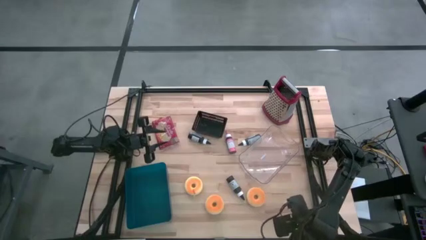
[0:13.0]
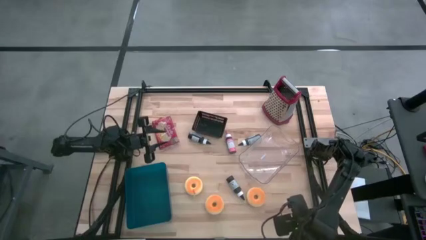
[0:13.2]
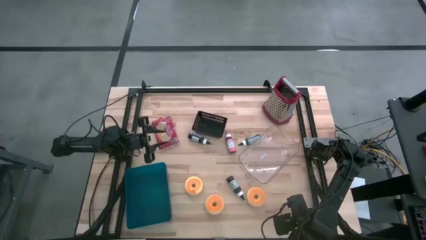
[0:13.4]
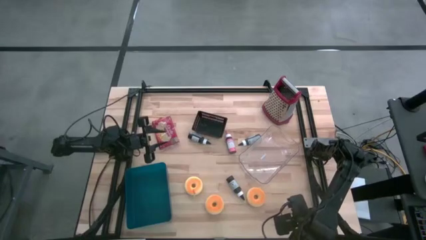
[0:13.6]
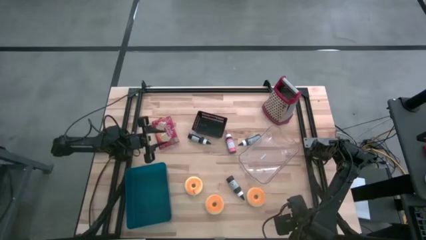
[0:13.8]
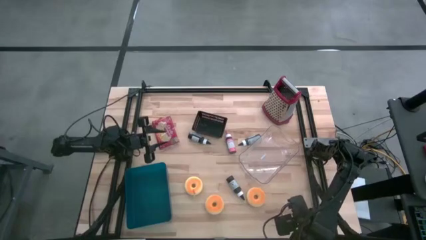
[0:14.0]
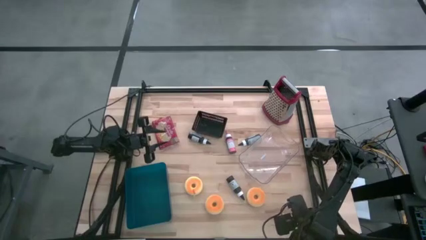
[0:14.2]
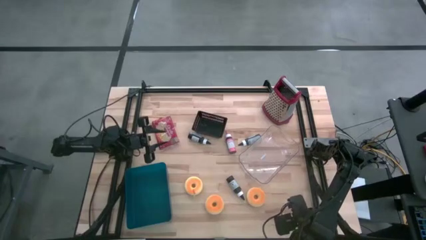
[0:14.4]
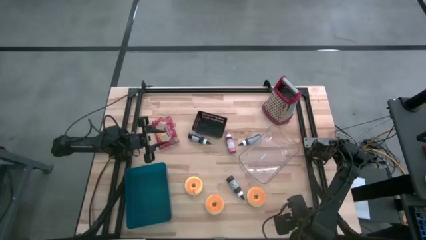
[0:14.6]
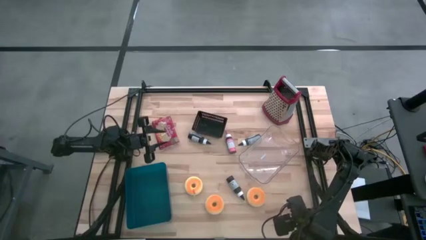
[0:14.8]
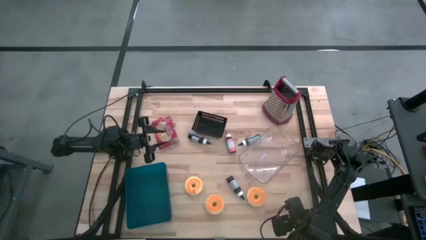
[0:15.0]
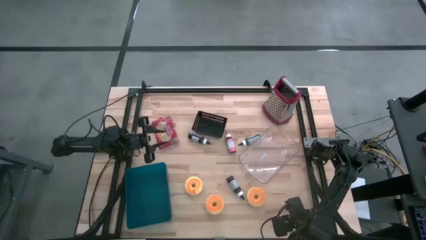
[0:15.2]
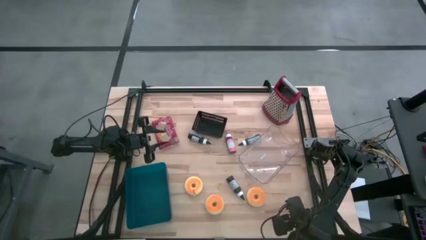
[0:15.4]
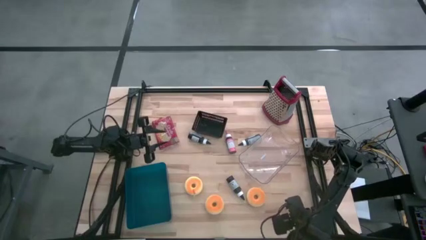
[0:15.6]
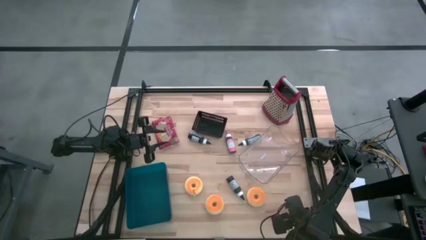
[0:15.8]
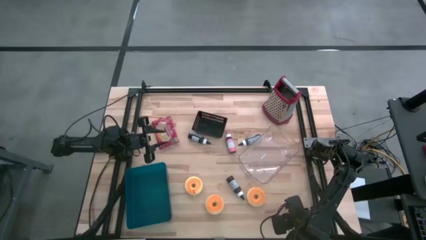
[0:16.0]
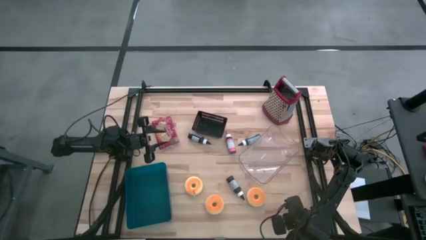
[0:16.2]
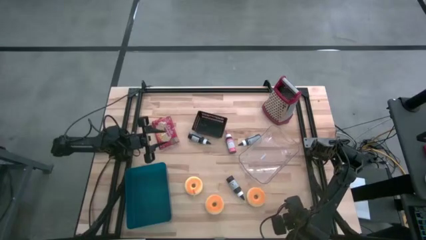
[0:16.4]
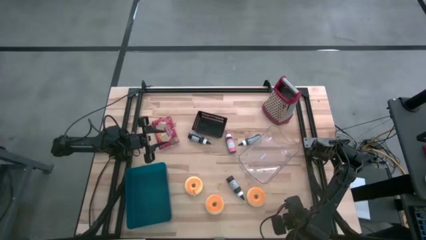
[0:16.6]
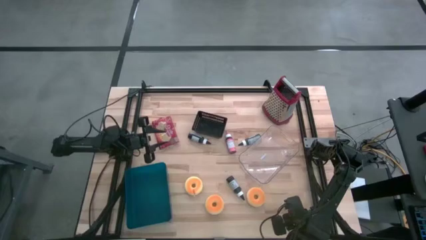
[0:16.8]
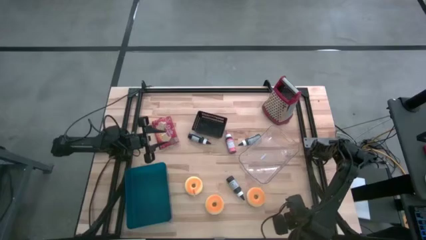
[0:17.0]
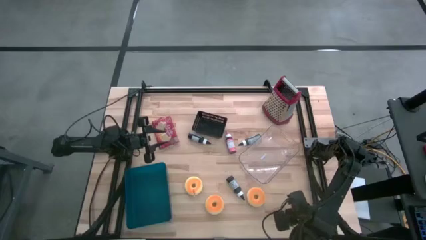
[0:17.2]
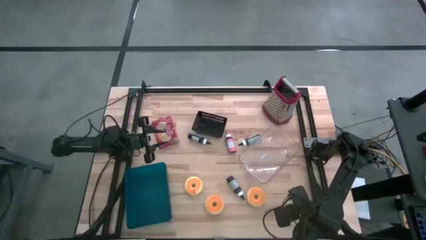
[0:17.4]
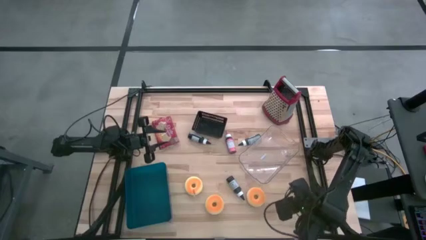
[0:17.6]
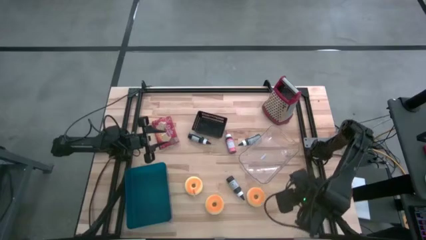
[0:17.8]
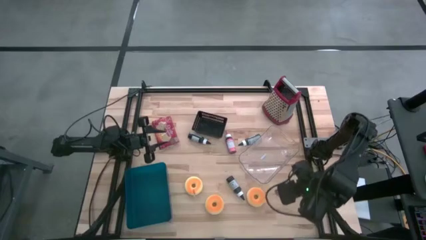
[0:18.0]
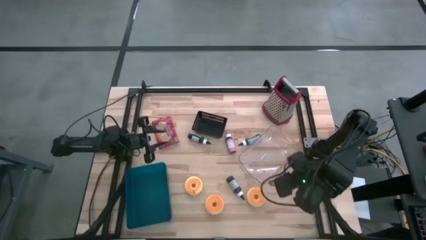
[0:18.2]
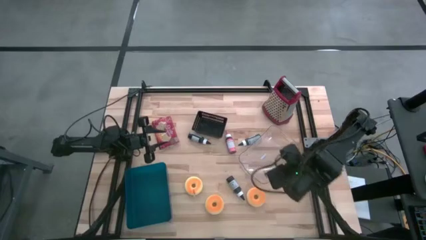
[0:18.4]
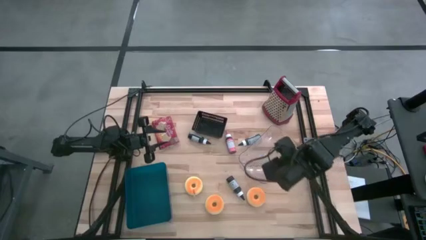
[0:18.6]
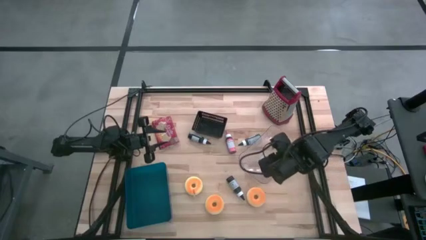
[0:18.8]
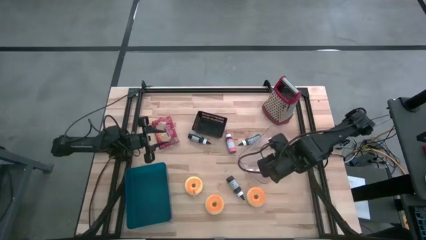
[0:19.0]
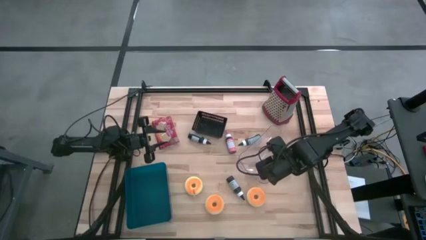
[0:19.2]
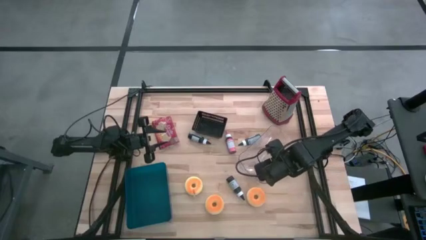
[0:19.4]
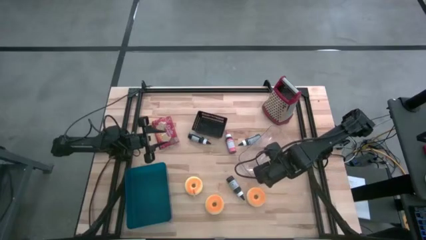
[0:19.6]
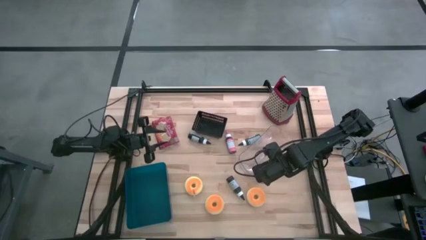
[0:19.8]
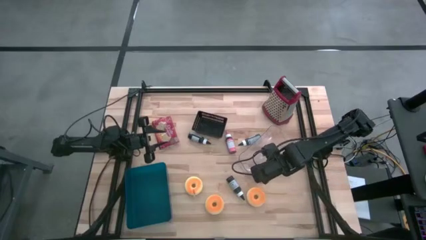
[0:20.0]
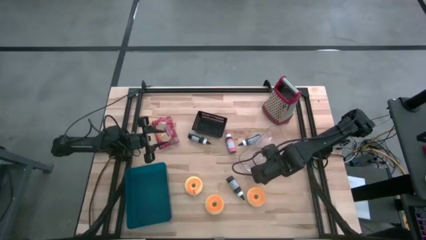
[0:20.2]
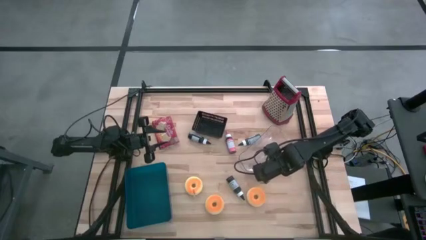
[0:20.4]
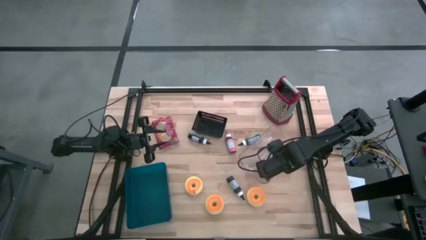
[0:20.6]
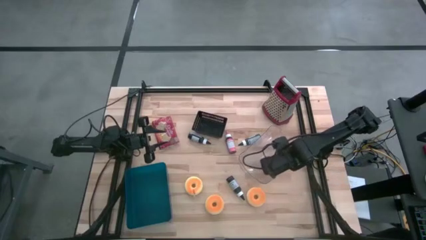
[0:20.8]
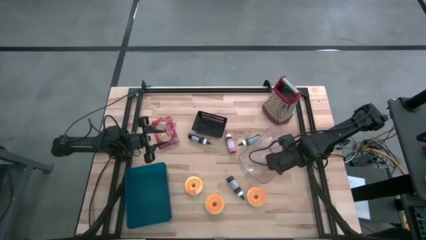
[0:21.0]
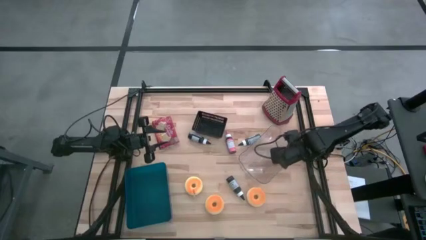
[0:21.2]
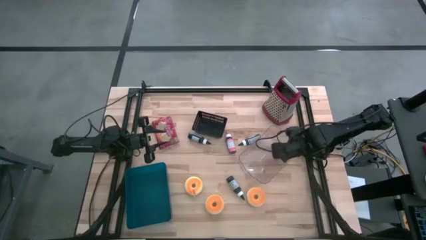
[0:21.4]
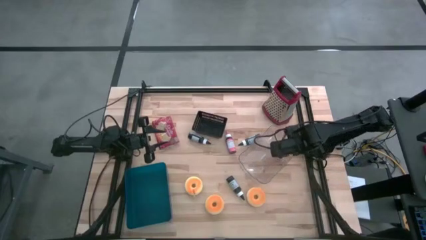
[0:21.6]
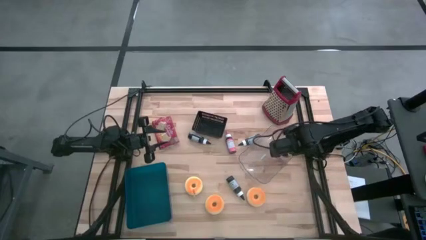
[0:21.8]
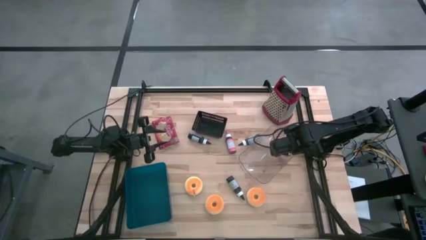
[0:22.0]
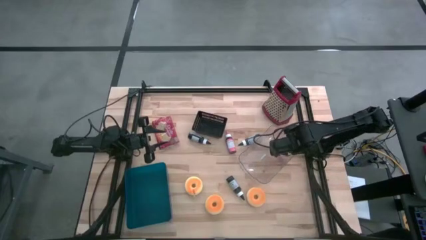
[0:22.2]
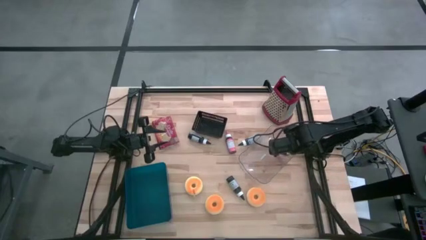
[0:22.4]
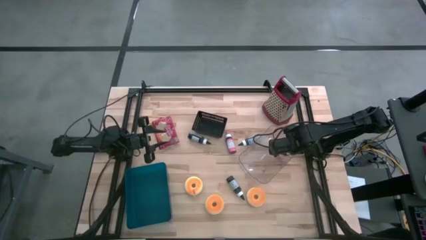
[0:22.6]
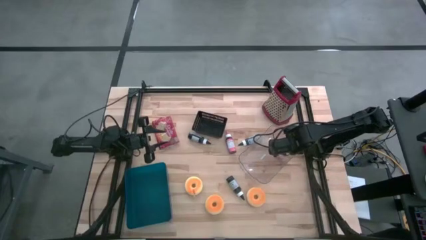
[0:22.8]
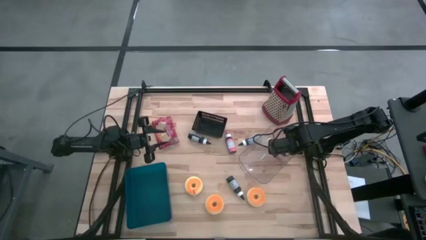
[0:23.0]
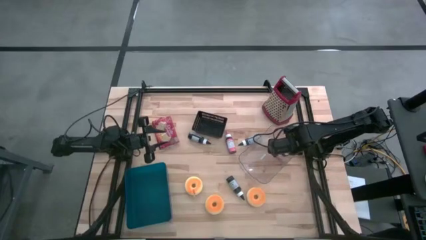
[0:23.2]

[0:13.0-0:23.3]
Task: Pick & Place Food Item
Put the bottom pink food coloring bottle into the transparent bin

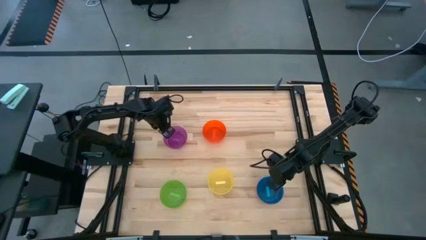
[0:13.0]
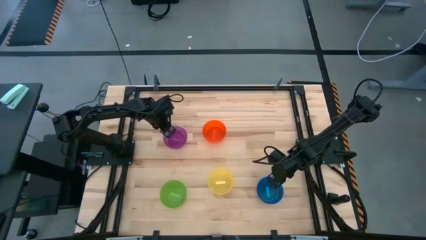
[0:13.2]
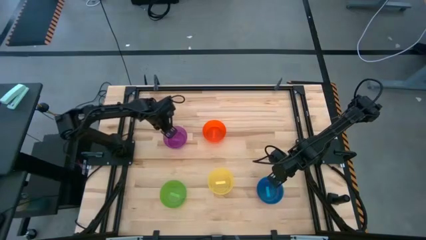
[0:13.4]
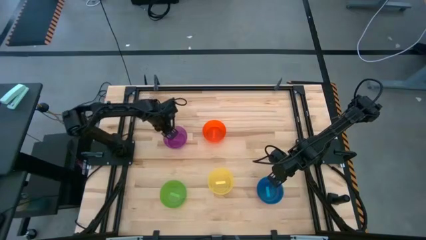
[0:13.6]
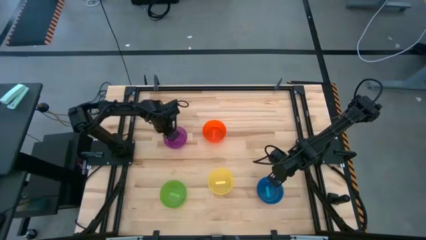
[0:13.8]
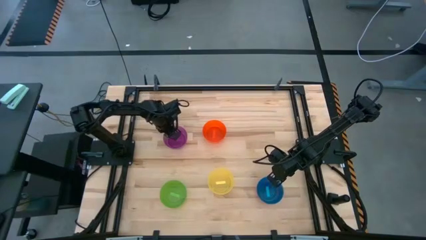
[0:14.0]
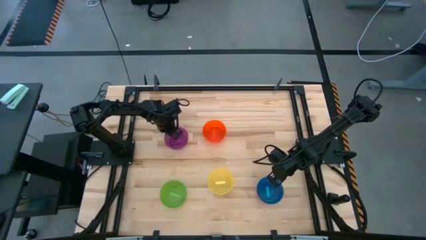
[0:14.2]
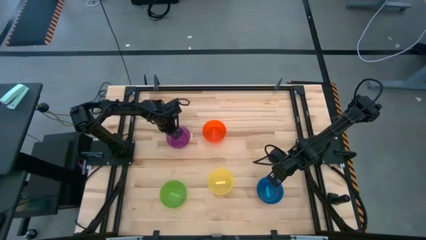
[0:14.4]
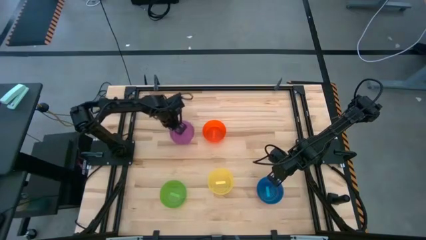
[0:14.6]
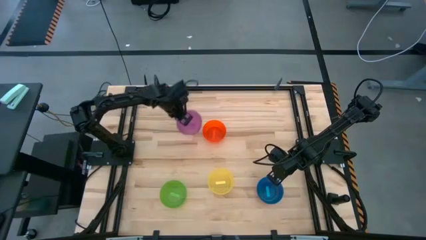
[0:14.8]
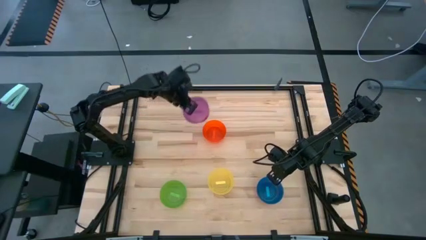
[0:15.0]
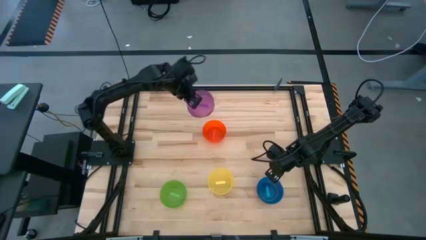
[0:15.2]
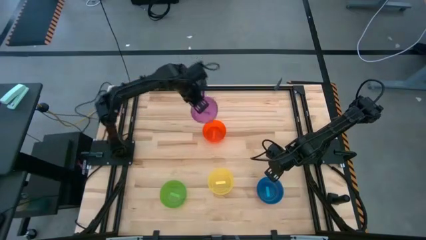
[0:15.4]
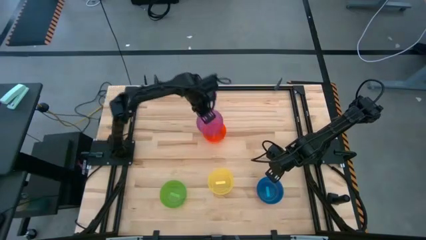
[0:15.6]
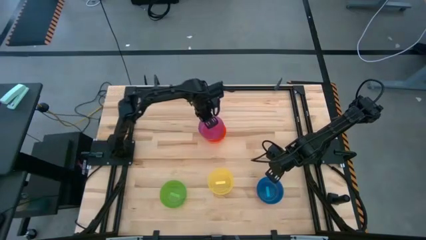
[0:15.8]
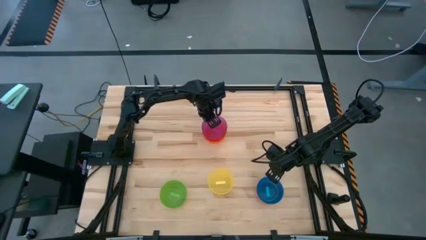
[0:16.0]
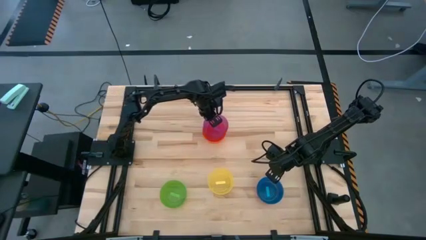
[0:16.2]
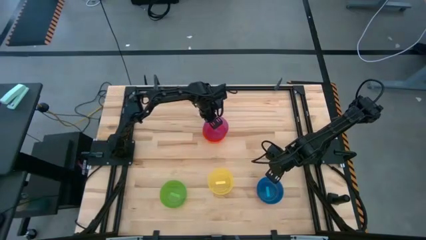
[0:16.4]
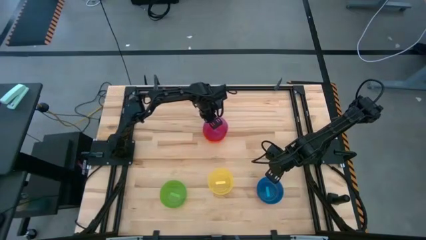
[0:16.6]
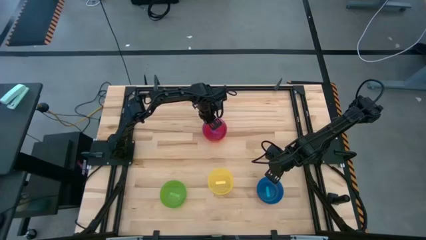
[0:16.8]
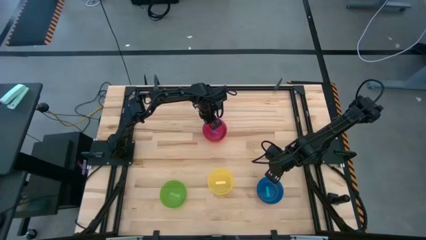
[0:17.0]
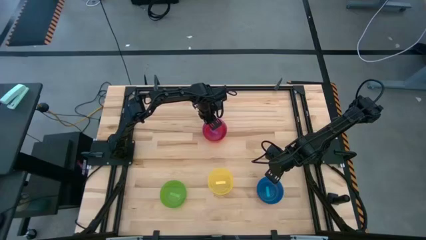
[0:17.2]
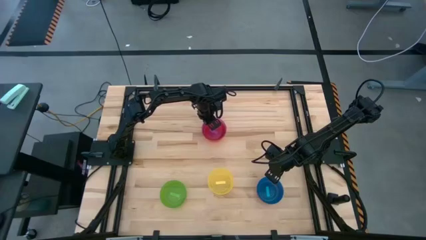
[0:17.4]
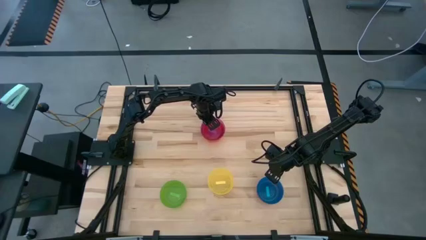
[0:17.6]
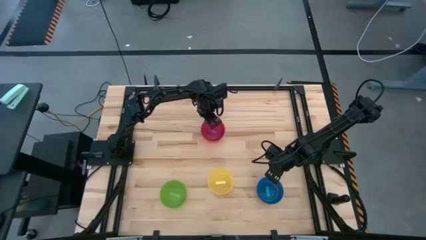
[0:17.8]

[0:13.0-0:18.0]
Task: Nest bowls inside each other
Stack the purple bowl on top of the orange bowl
